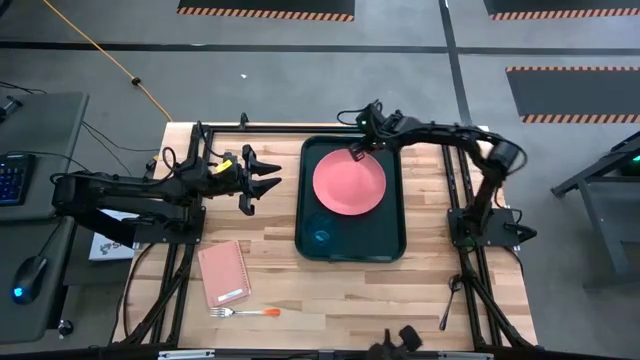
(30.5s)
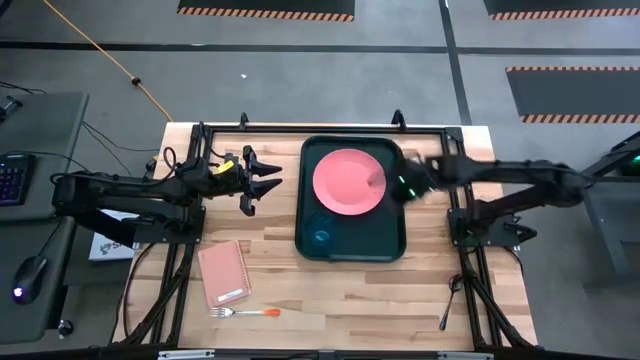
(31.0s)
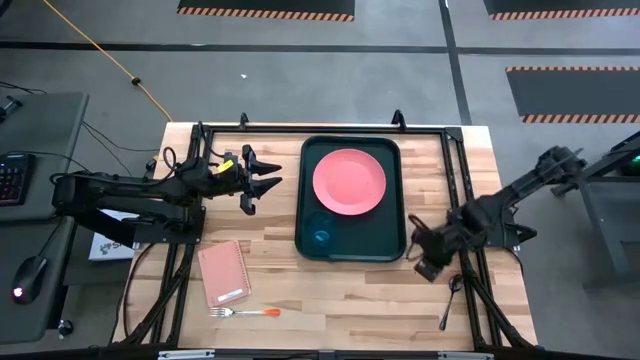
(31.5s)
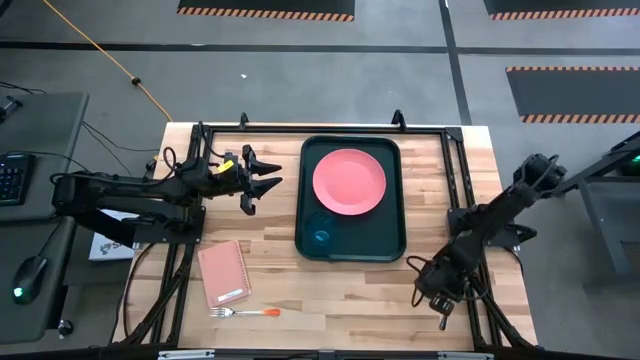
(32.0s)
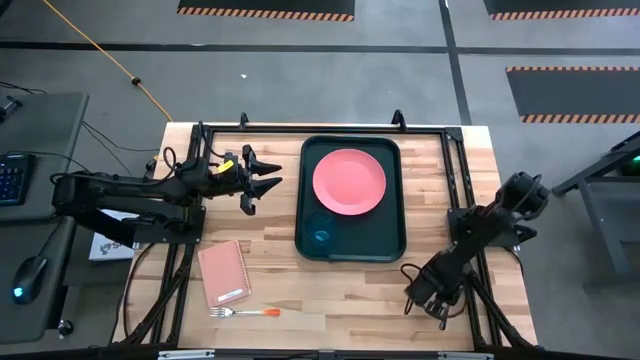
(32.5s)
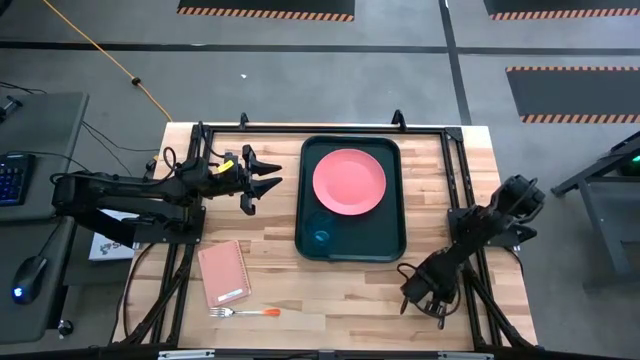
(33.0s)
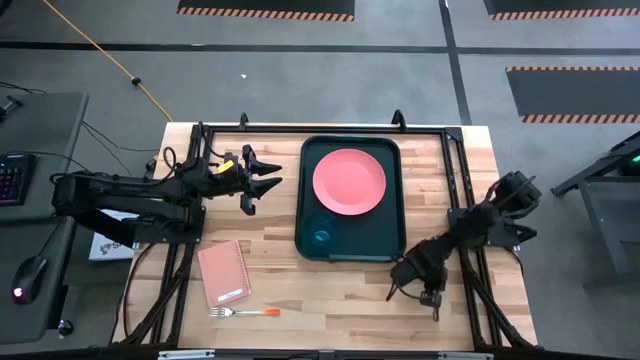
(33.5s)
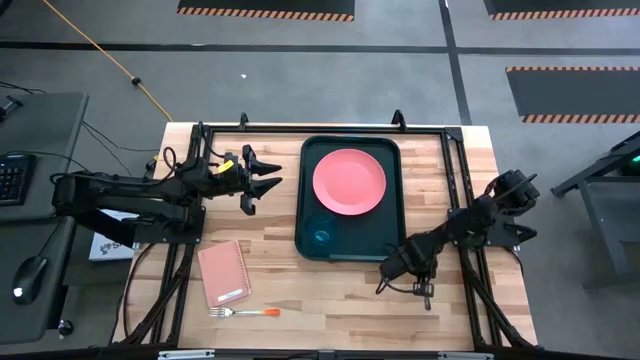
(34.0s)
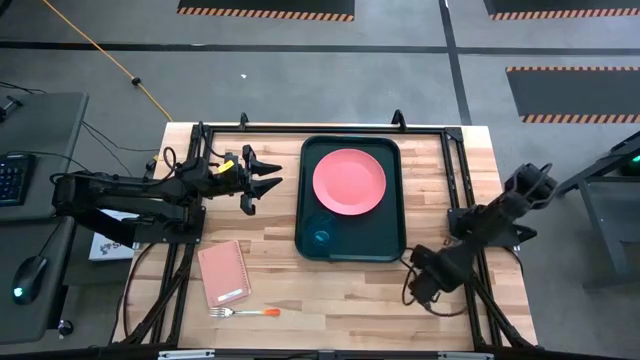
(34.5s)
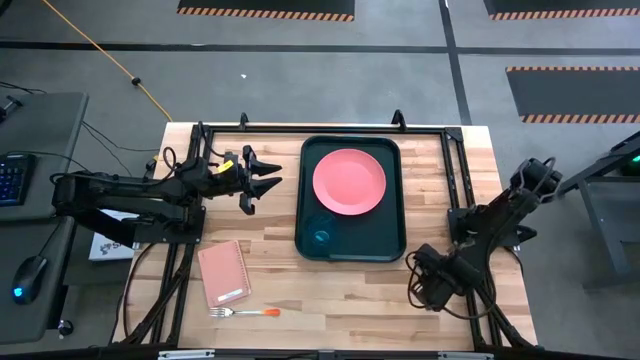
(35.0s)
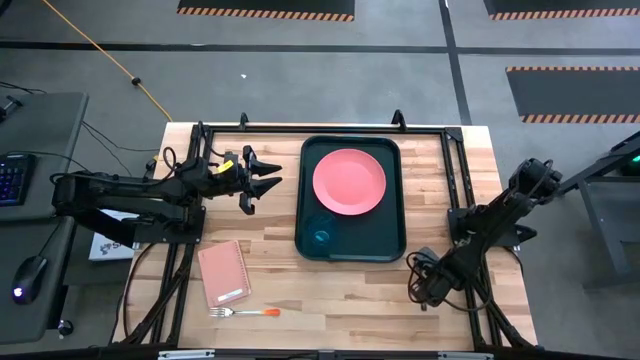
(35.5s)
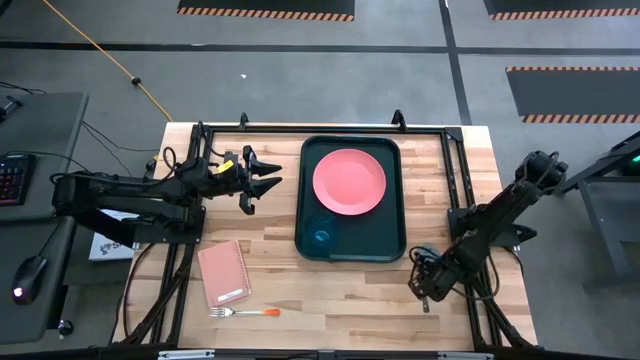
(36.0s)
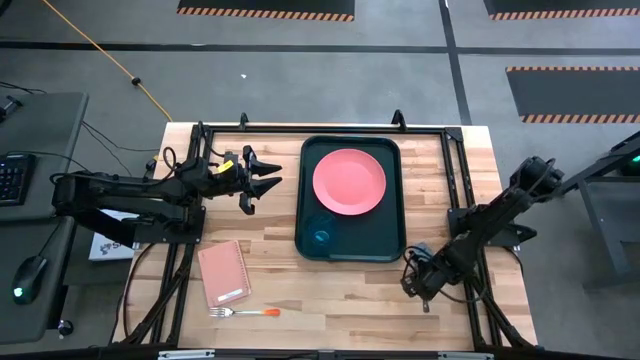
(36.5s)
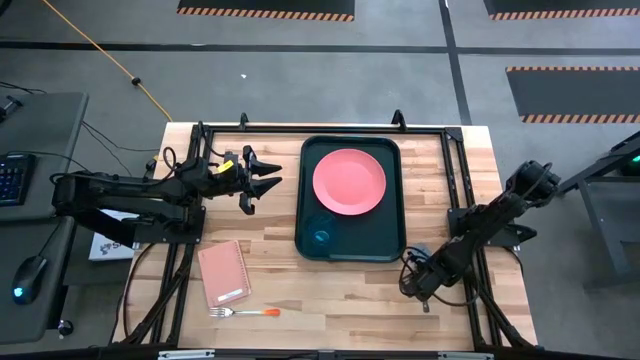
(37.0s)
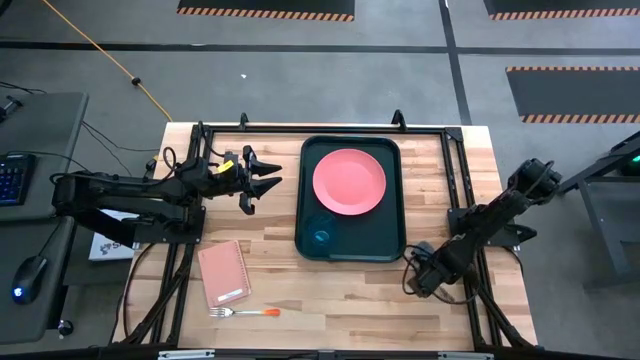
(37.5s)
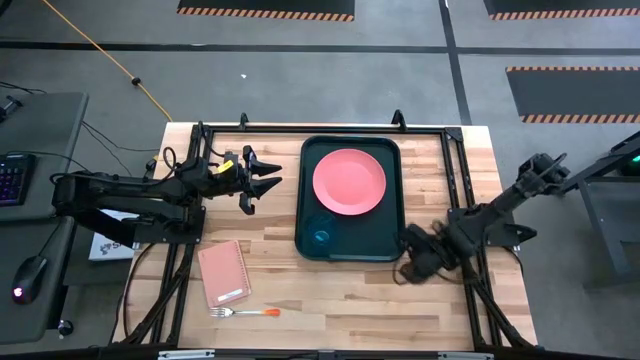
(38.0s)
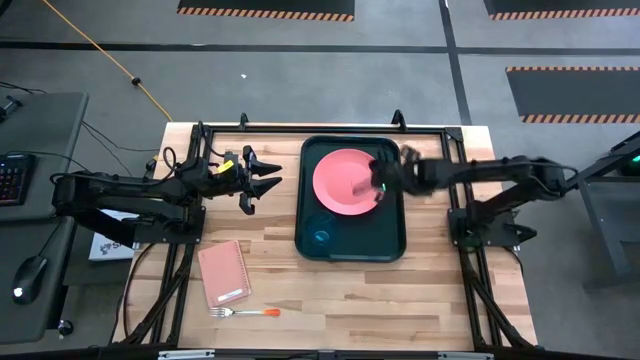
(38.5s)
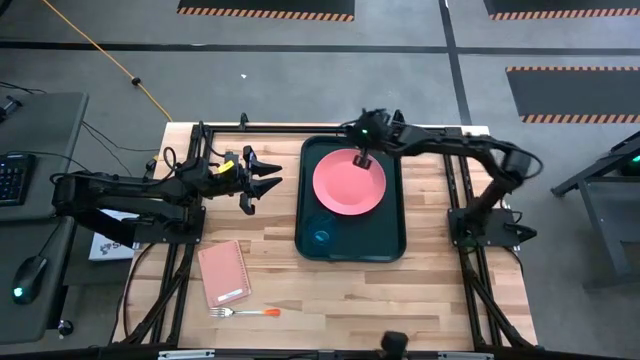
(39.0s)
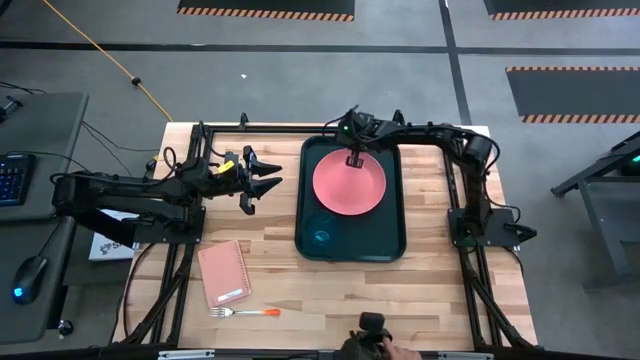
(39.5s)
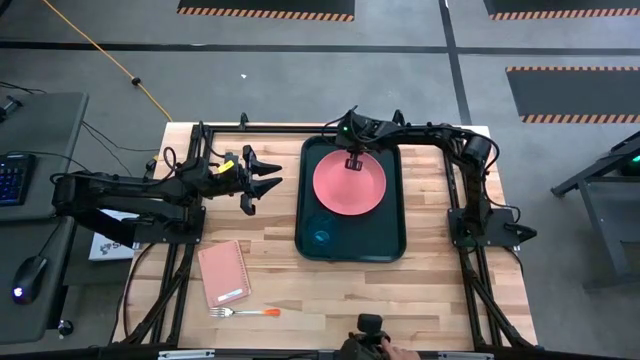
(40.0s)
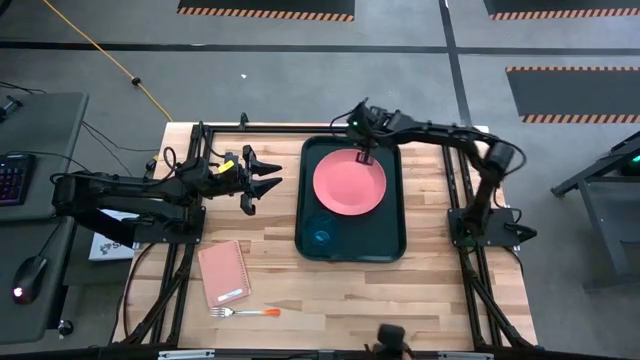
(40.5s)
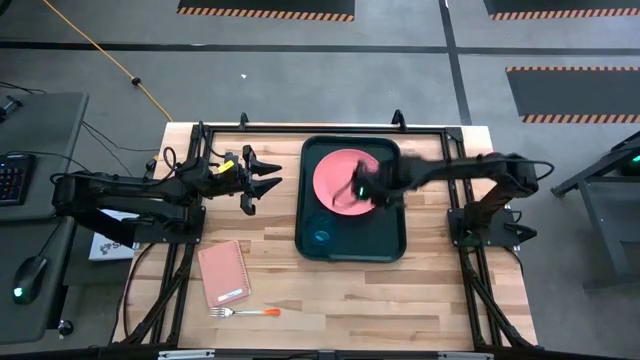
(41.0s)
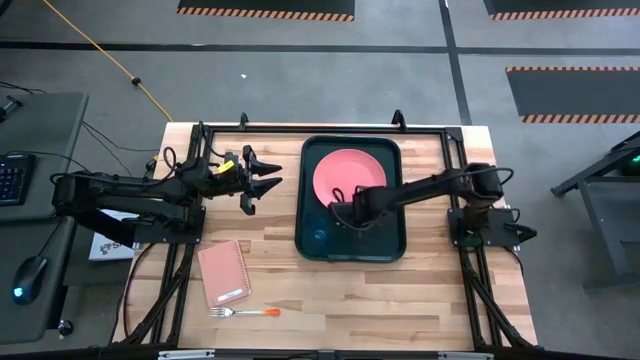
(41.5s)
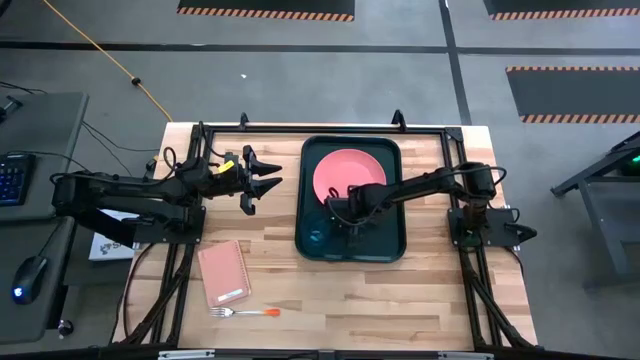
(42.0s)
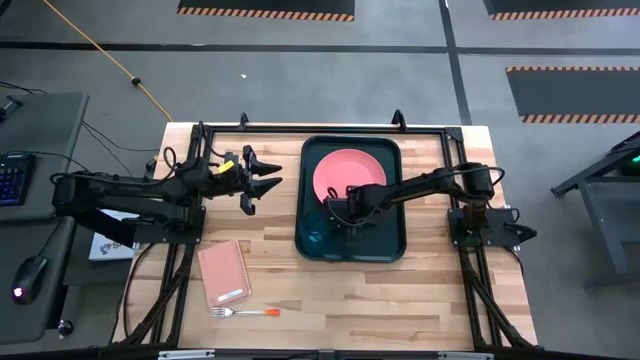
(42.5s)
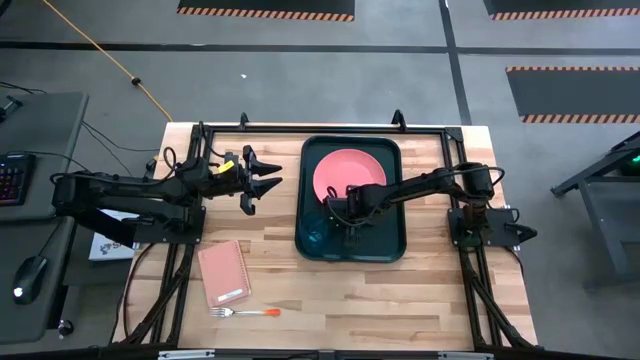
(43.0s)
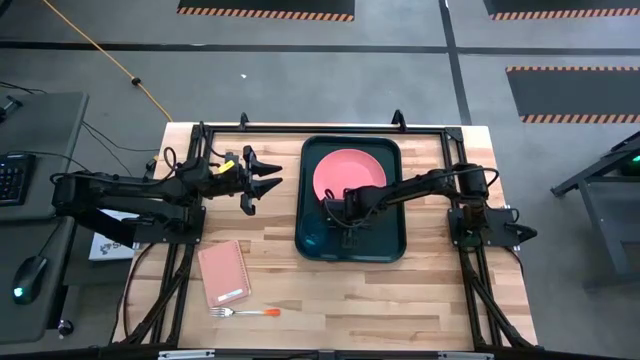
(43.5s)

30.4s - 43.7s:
Task: Pick and place plate/cup/fork/spoon on tray
Put the black spoon on the black tray to the bottom of the pink plate

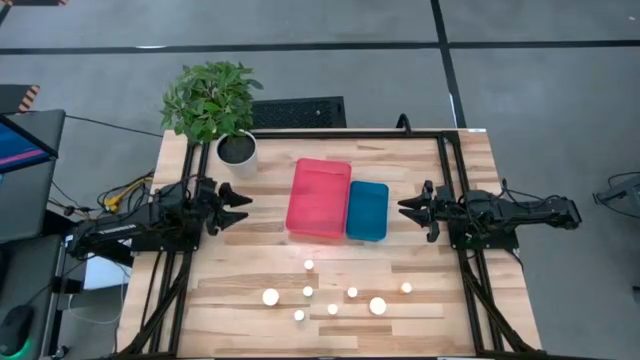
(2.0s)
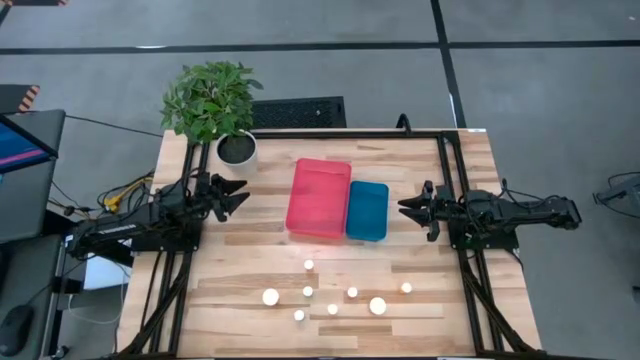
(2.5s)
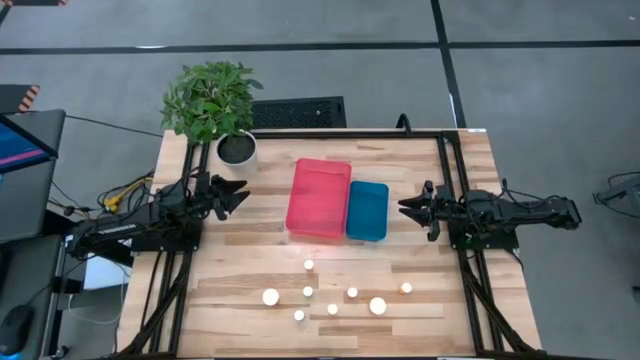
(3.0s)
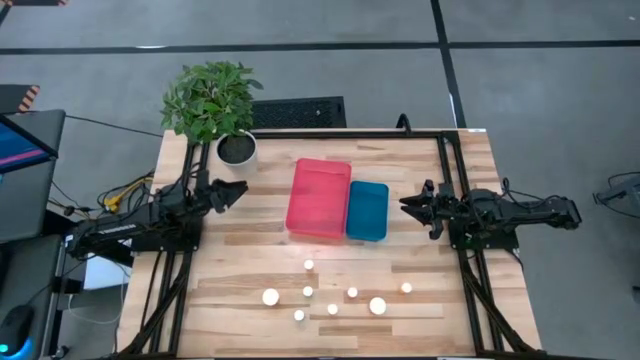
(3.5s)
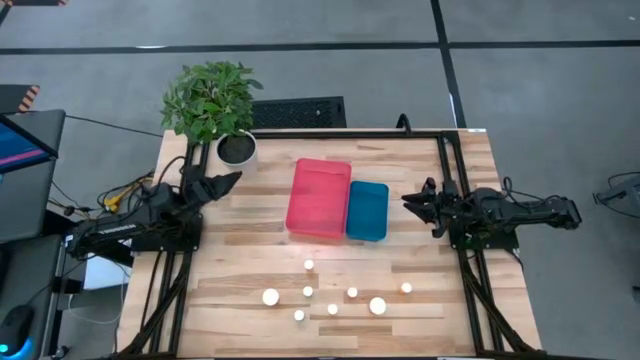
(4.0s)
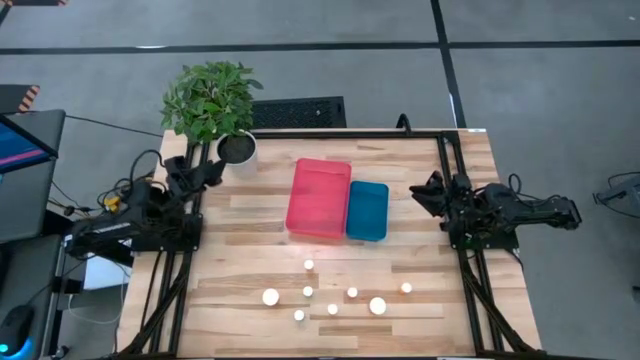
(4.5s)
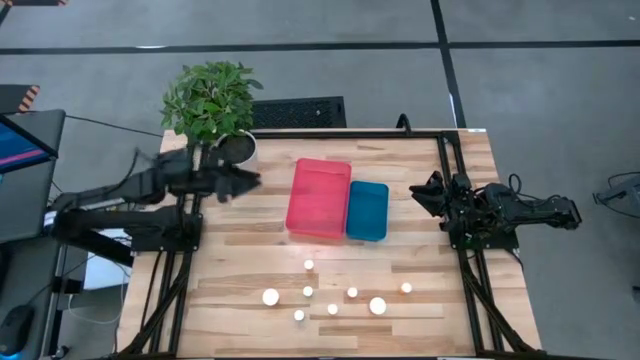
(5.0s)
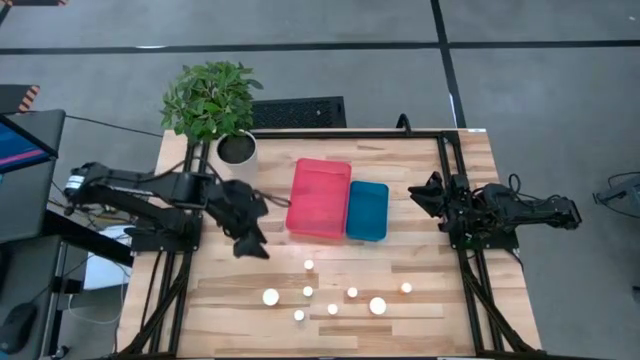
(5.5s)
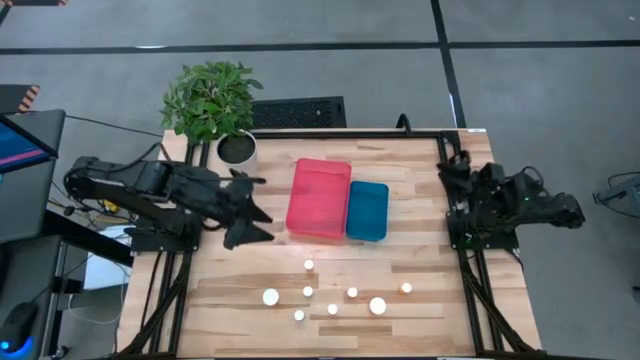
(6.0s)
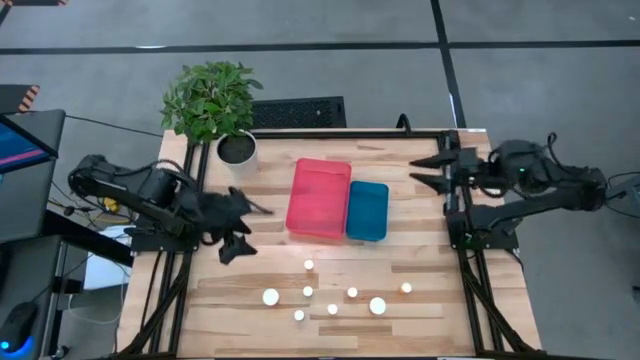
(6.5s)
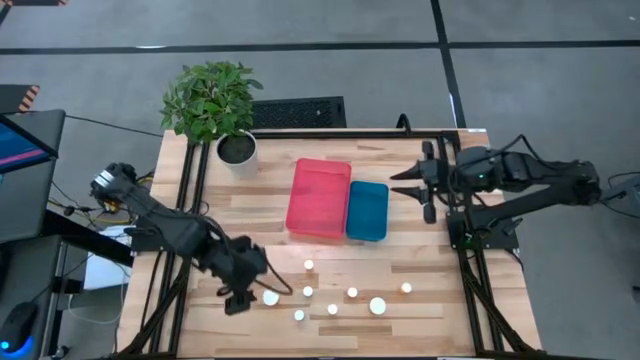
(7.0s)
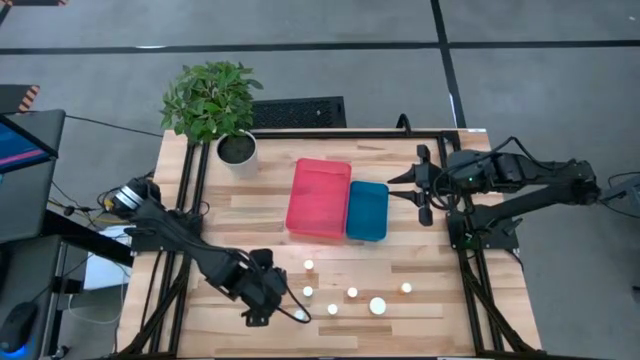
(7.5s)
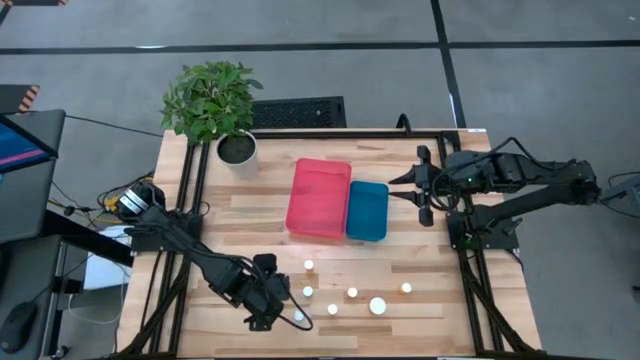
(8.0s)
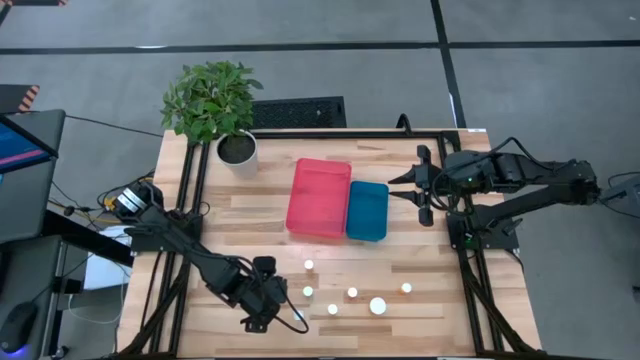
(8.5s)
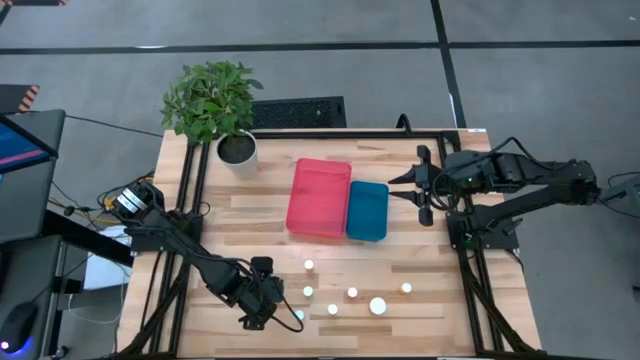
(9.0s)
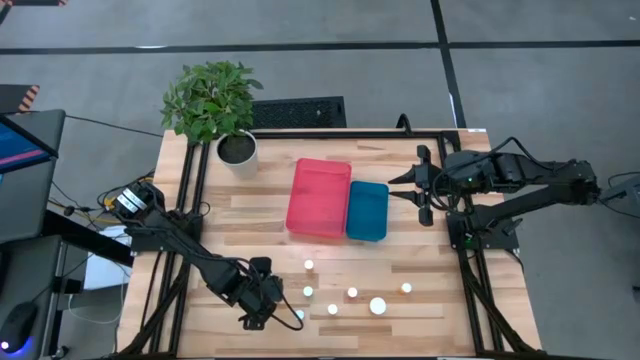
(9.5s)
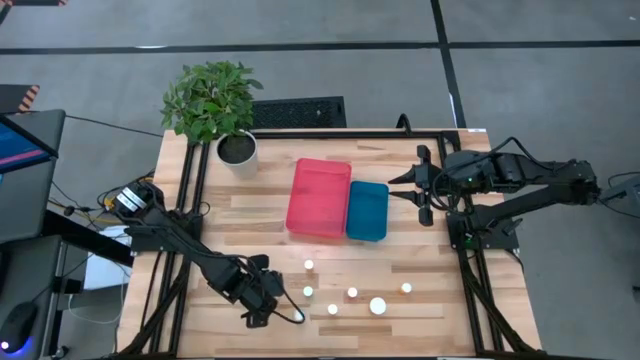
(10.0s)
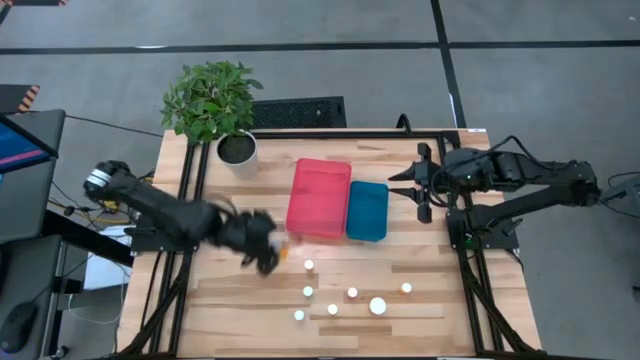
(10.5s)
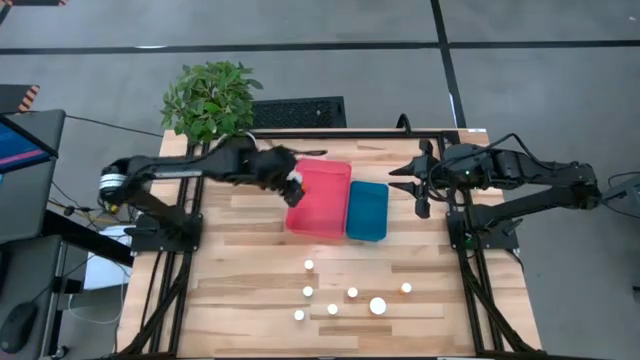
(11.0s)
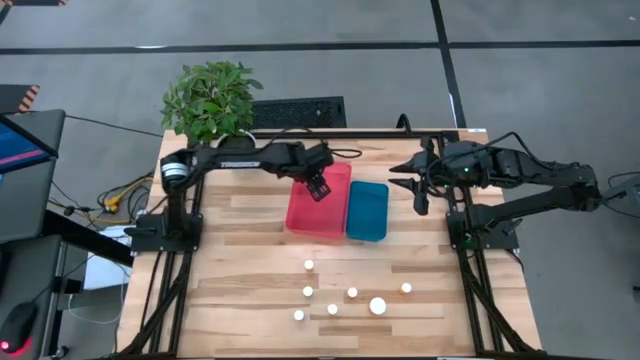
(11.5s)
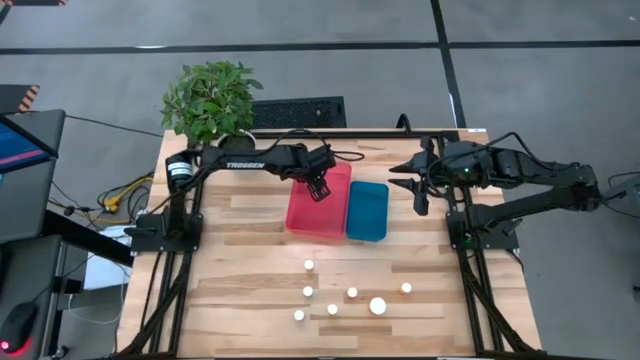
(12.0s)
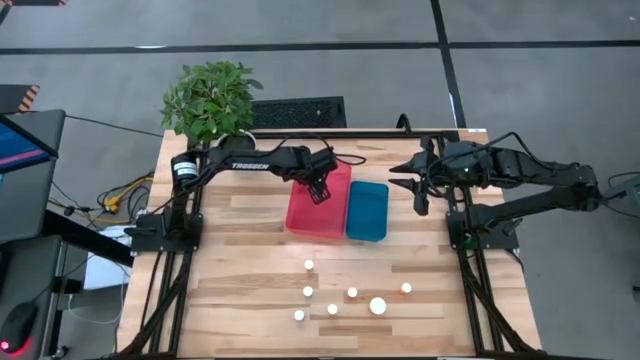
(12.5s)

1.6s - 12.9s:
Task: Pick and place medicine bottles into bin by pill shape (circle, oval)
Put the big orange pill bottle into the red bin
